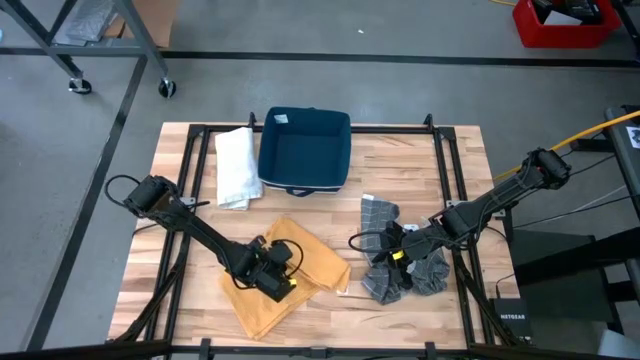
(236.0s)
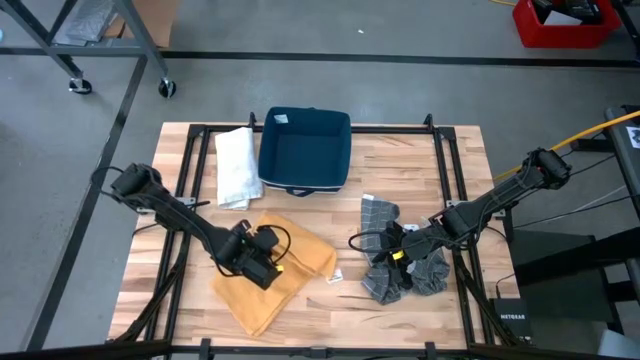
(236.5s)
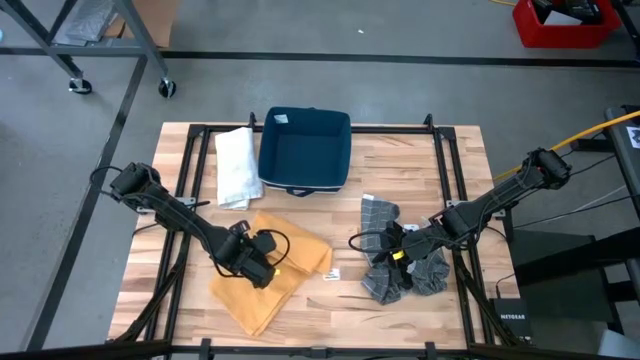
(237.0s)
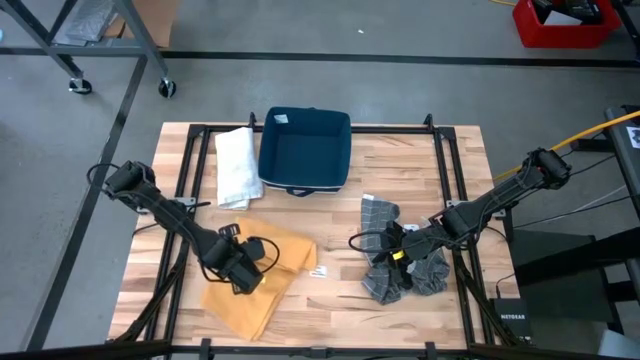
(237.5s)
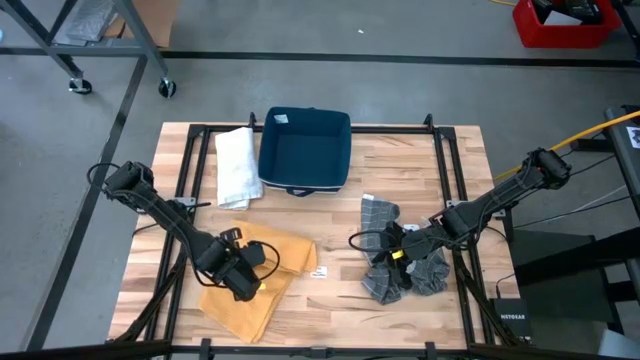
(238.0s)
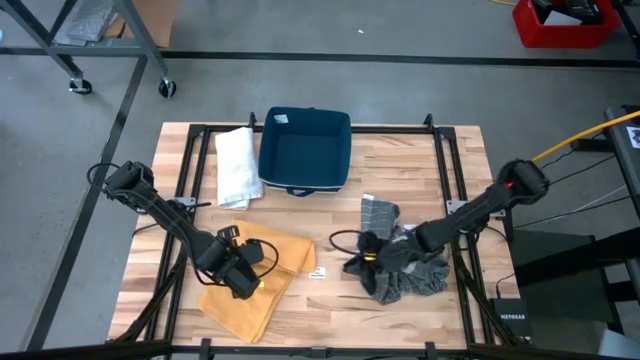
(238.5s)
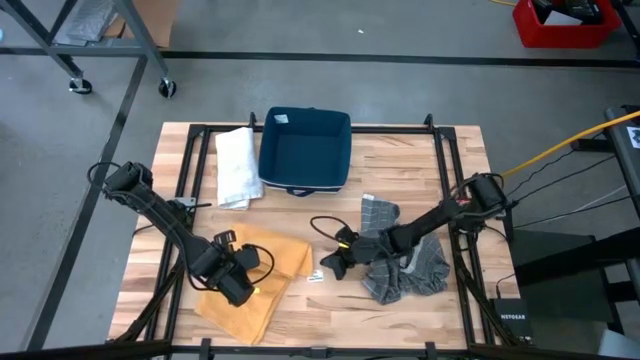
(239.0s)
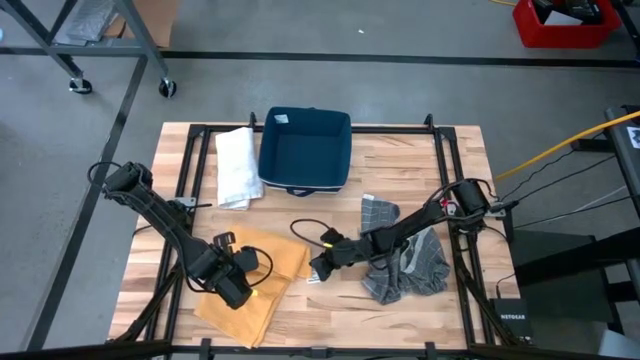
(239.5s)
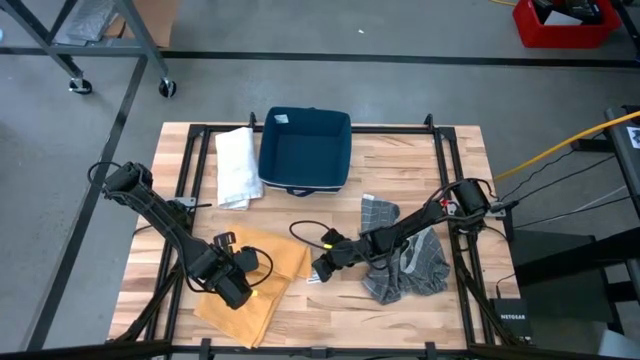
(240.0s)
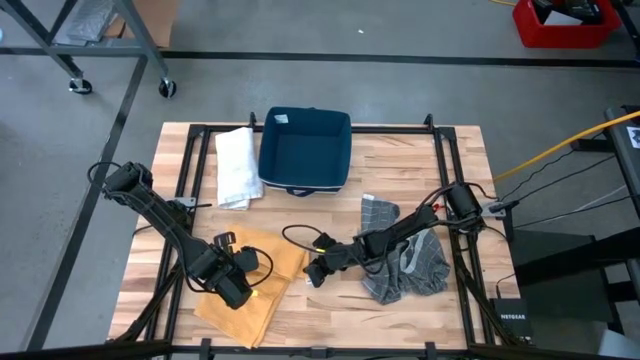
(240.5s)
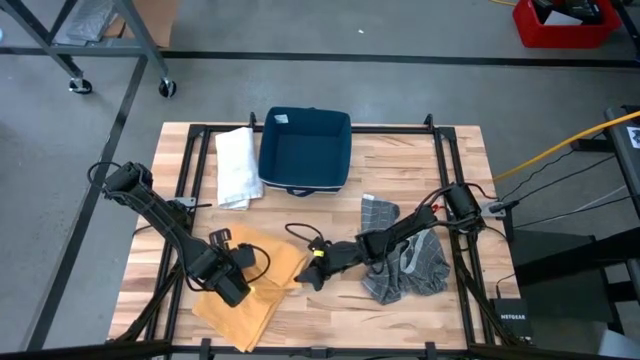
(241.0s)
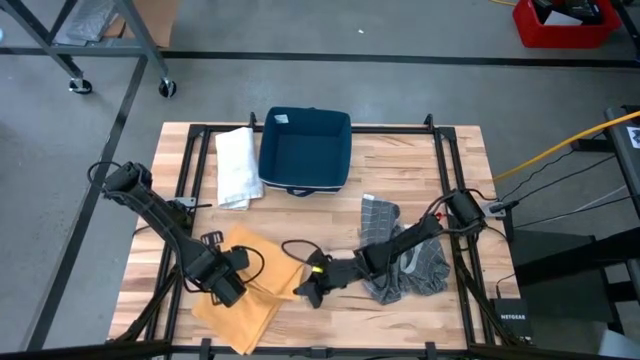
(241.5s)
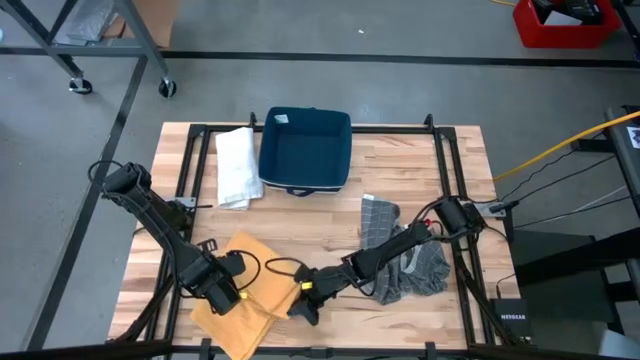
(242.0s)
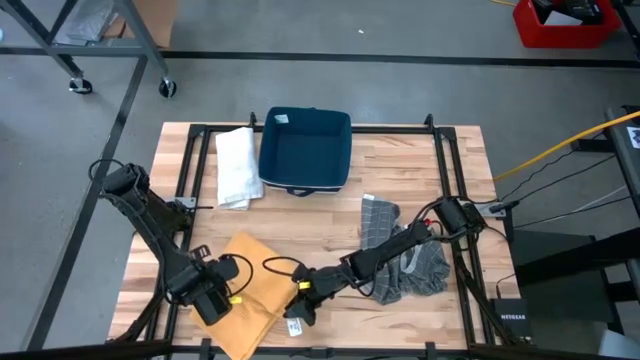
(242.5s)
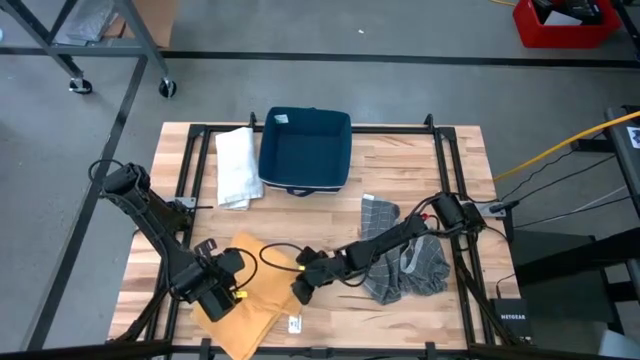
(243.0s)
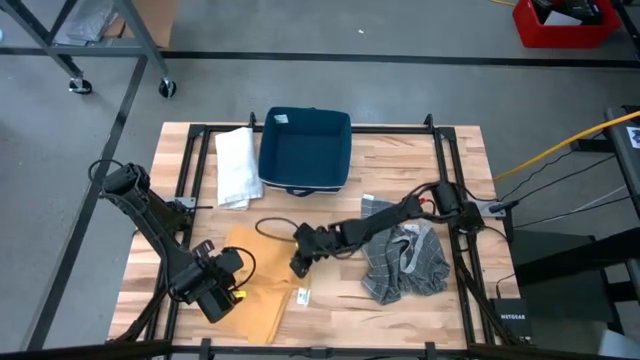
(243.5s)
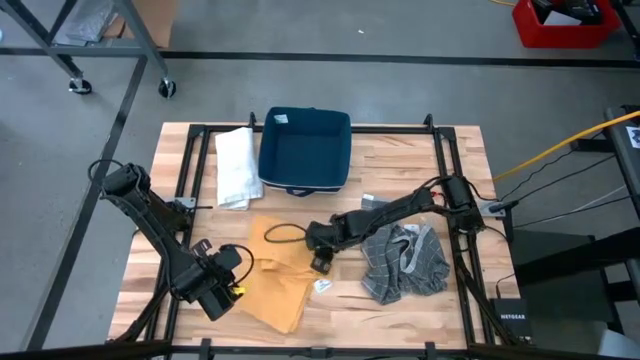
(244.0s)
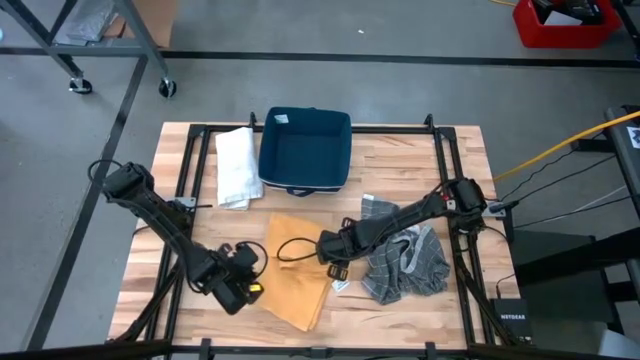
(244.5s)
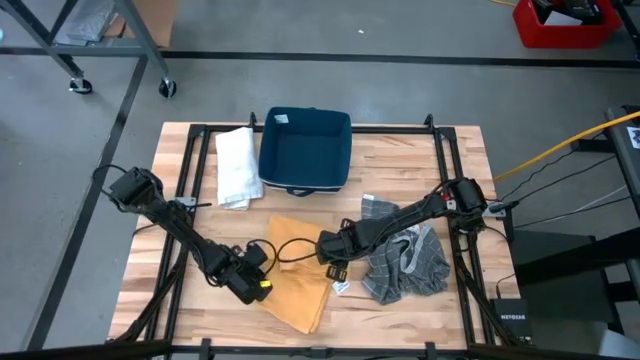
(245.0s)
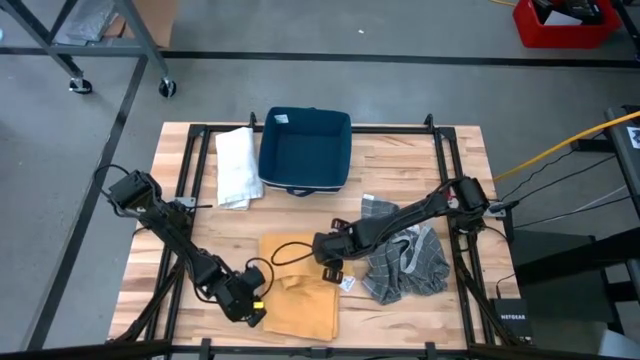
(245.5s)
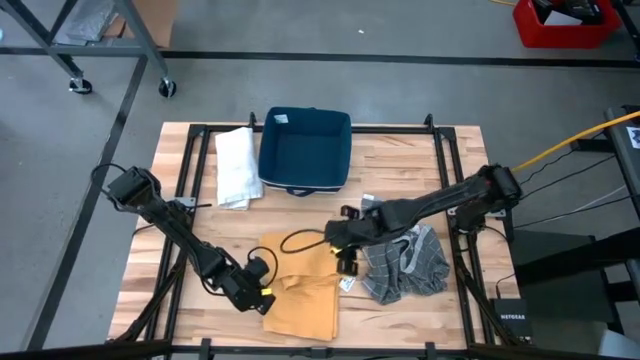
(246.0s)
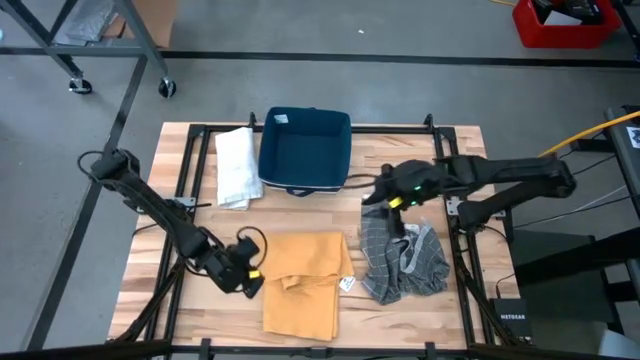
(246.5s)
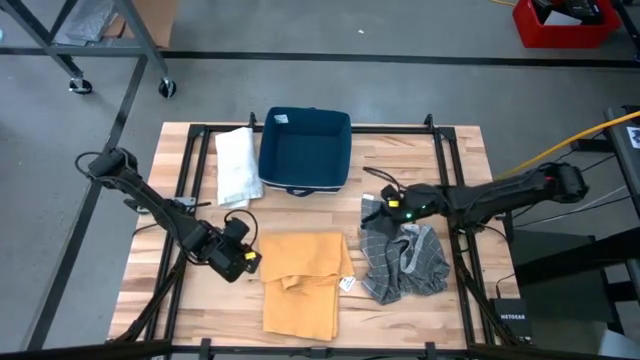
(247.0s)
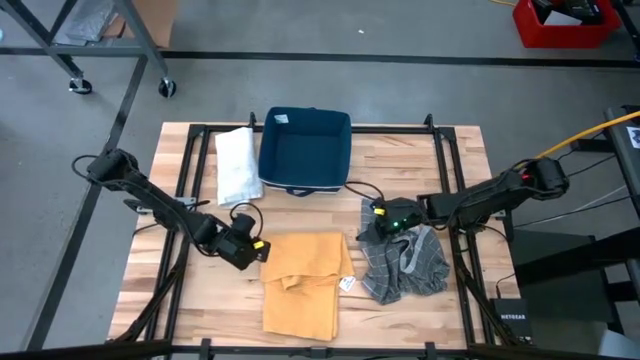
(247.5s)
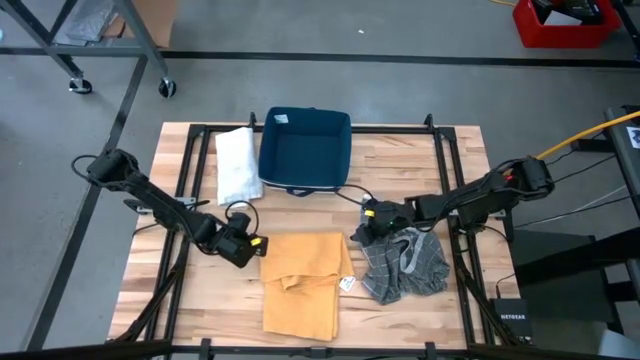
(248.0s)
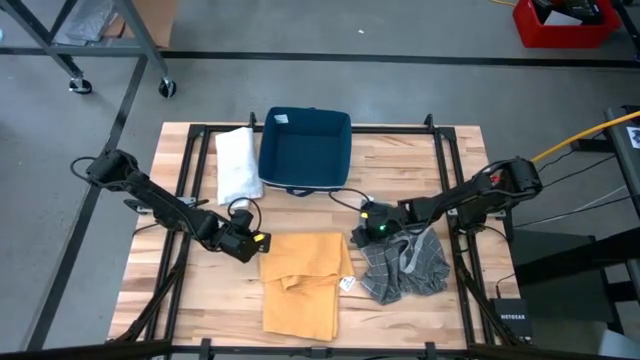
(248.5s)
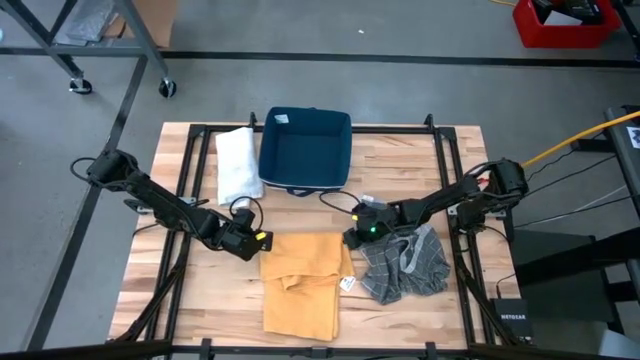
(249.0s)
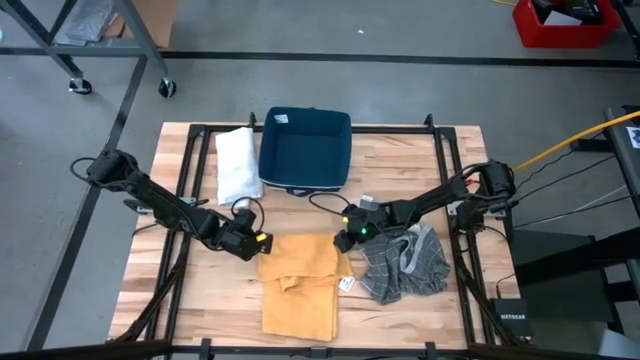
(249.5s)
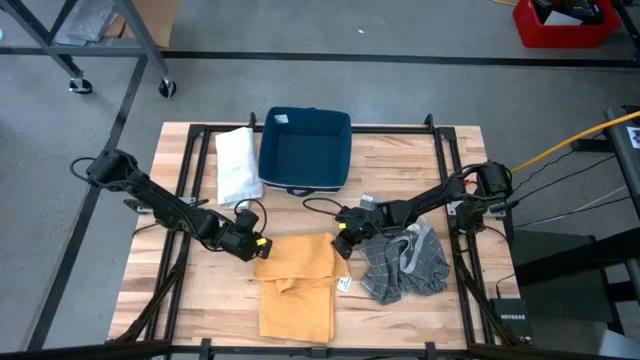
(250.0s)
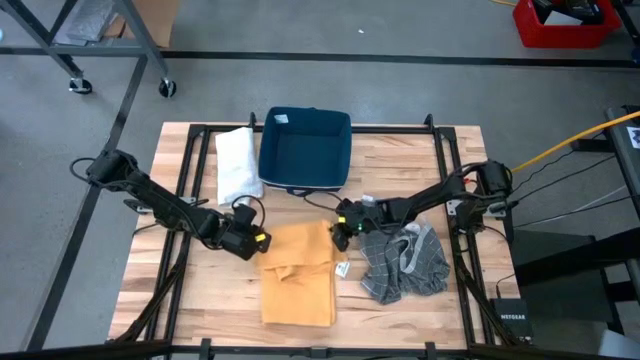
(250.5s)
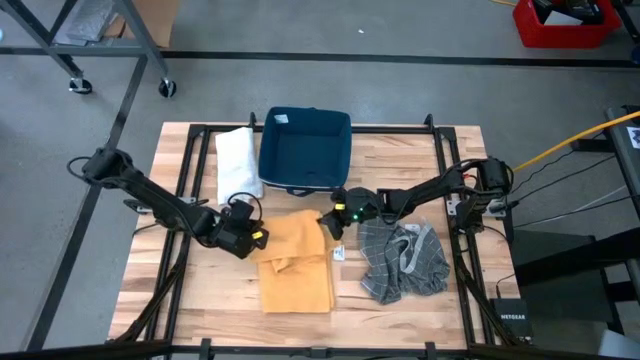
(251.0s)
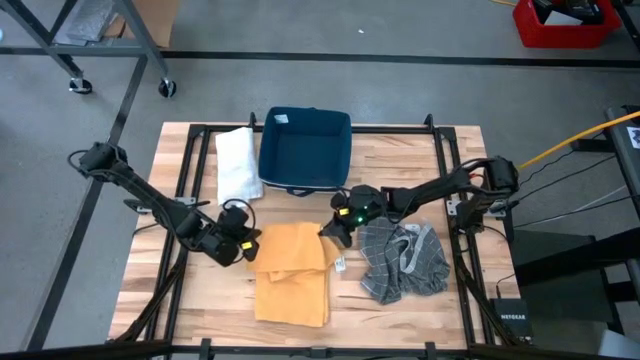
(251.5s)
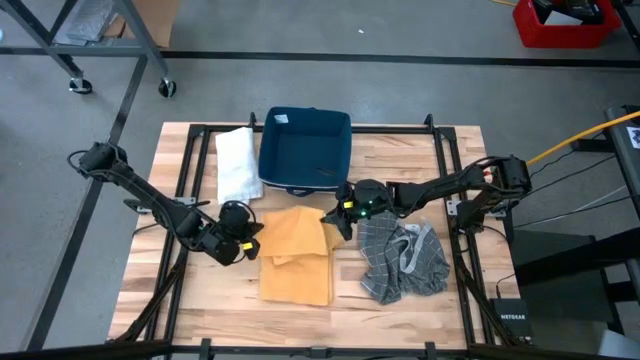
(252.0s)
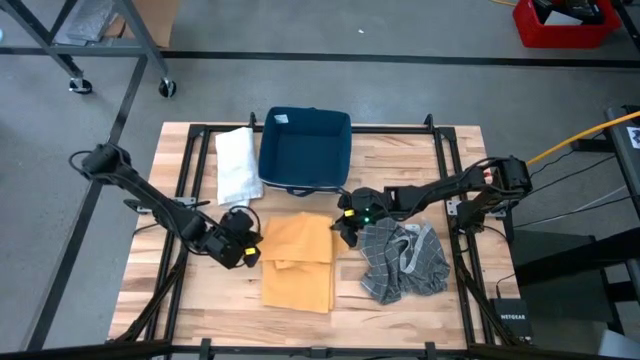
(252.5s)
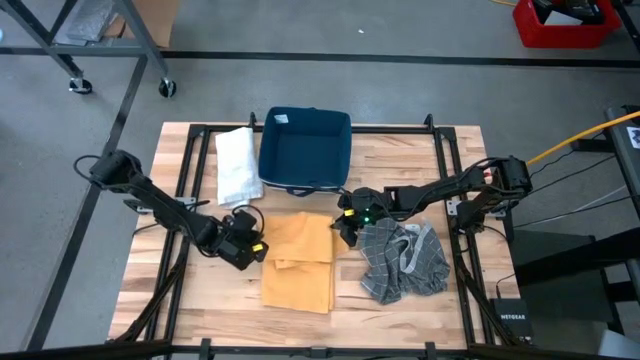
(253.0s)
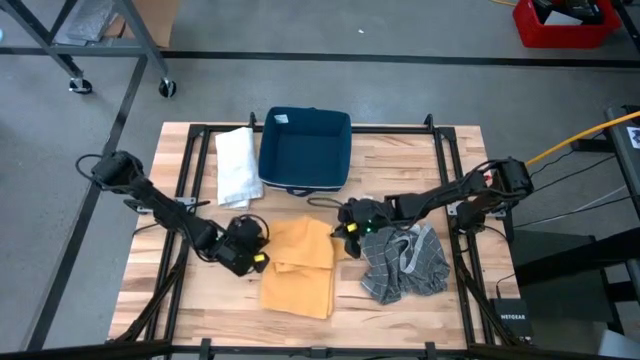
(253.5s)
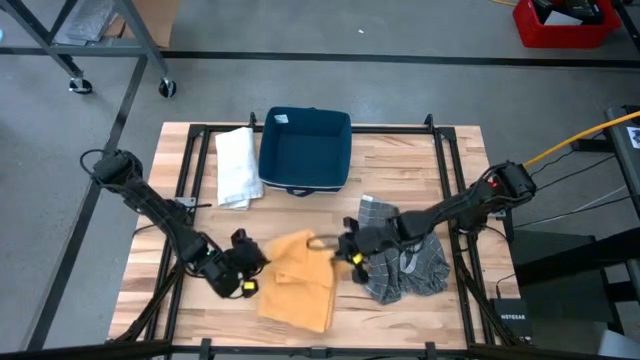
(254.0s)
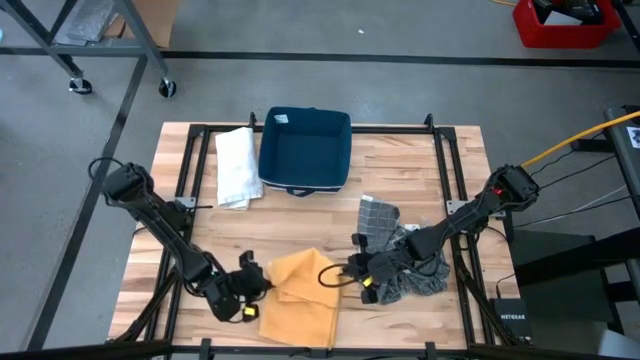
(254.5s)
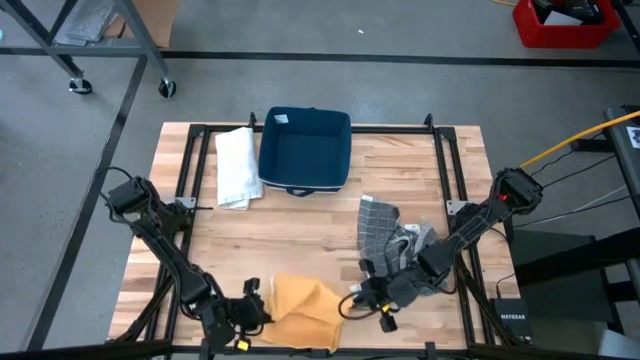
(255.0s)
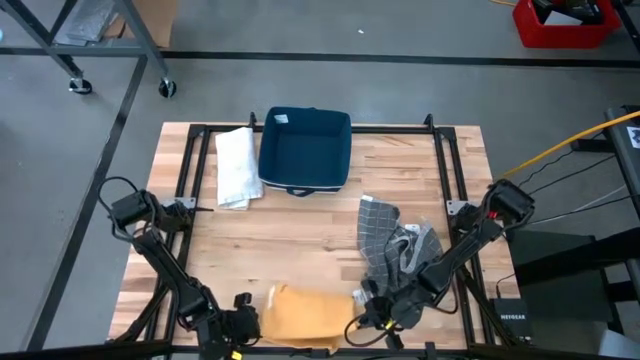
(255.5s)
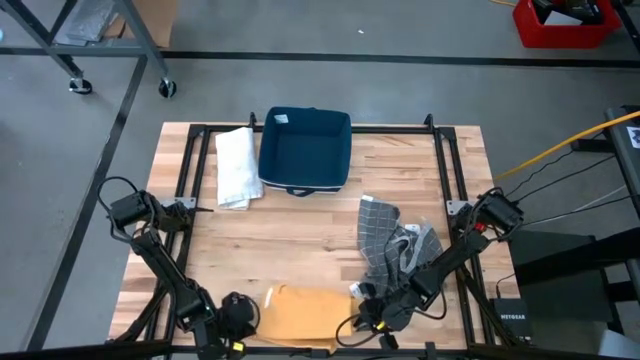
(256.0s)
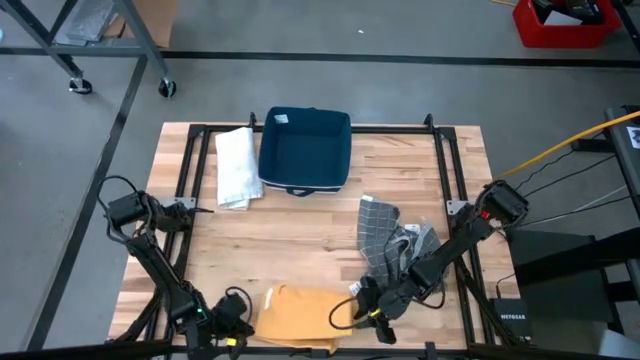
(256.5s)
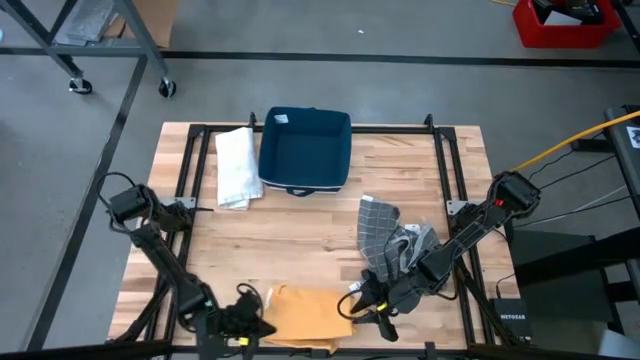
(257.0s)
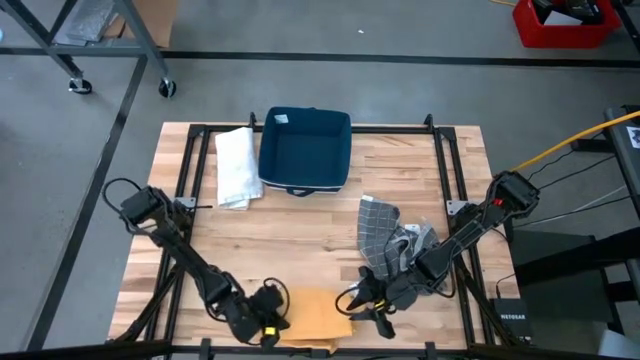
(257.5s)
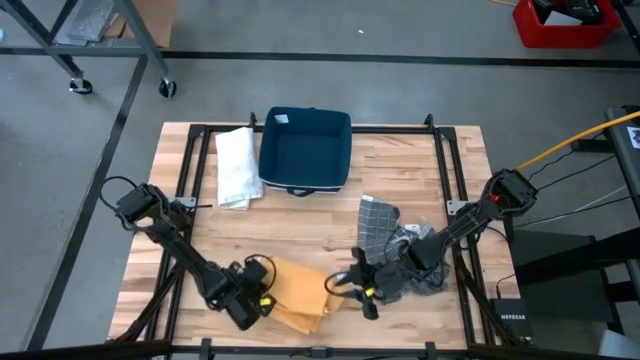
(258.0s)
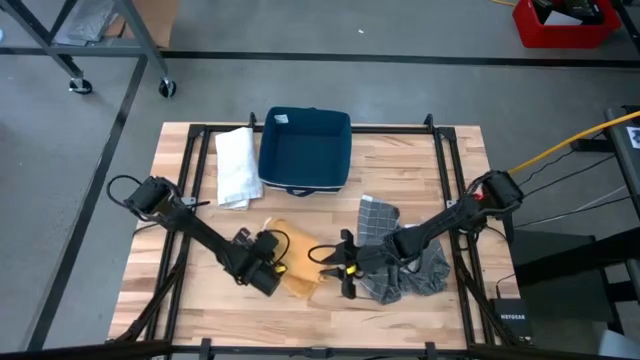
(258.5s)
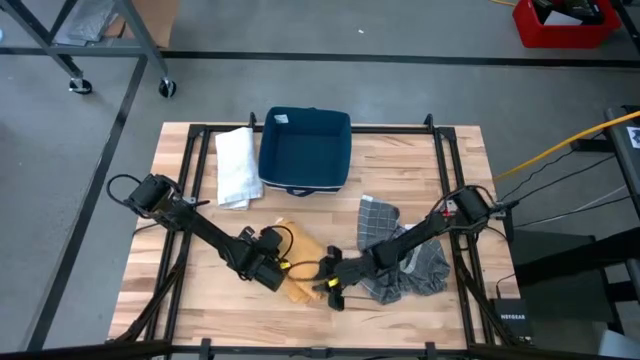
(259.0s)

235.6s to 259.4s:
Task: Fold towel
Fold the yellow towel
